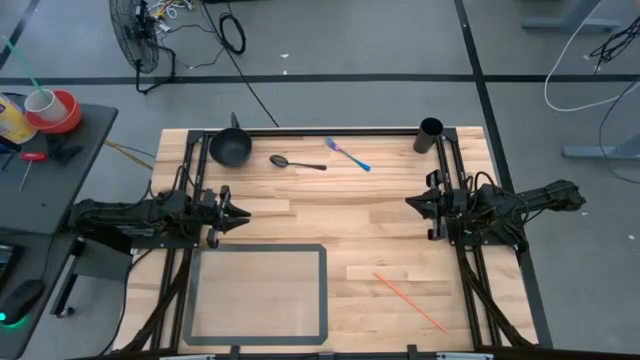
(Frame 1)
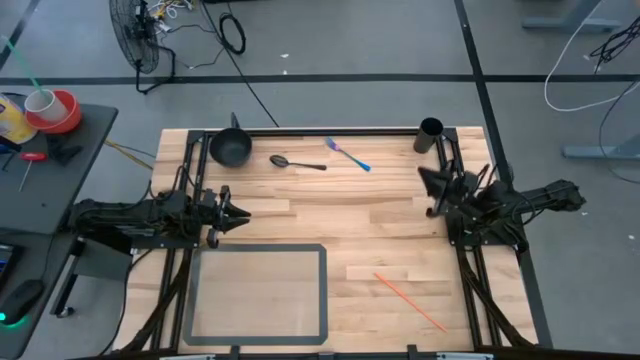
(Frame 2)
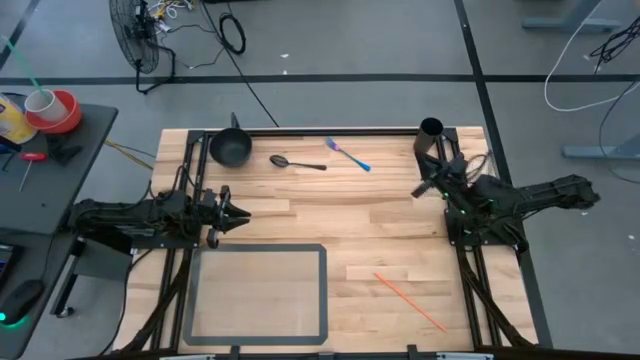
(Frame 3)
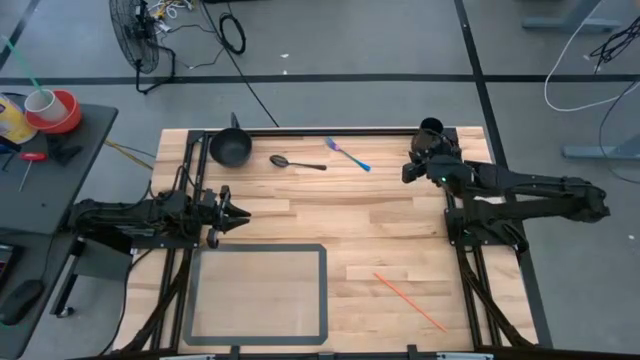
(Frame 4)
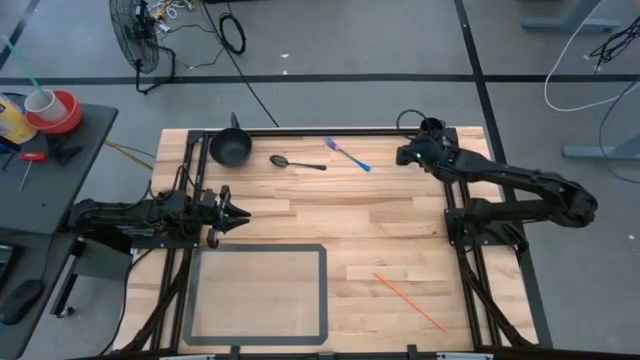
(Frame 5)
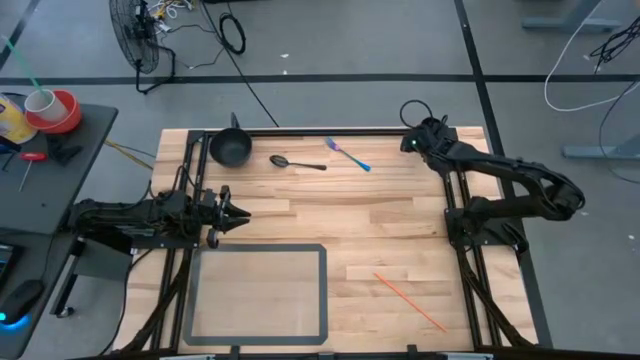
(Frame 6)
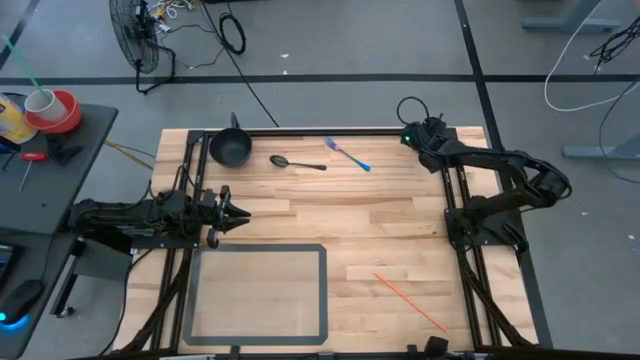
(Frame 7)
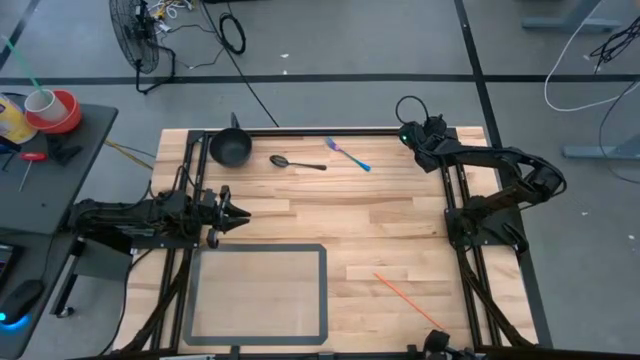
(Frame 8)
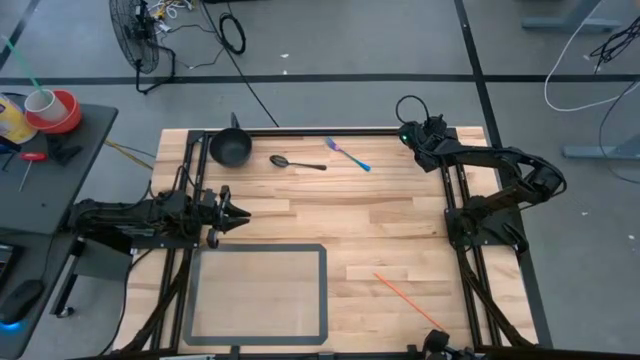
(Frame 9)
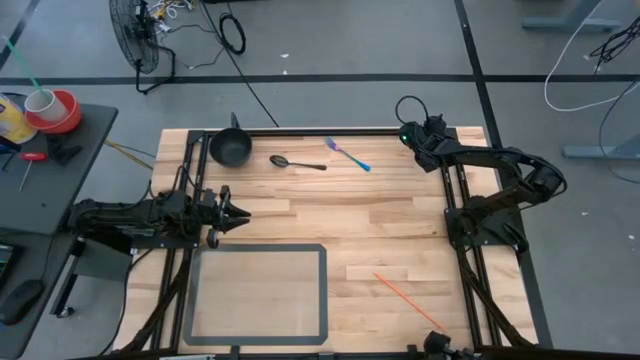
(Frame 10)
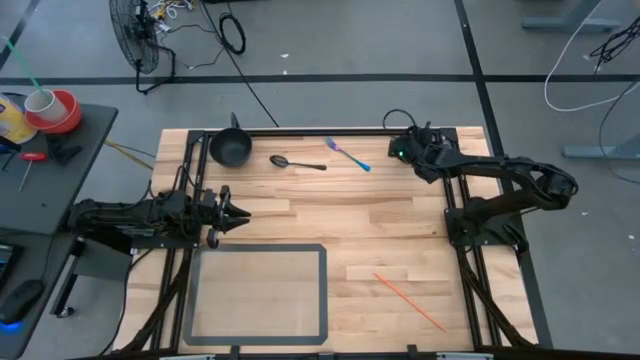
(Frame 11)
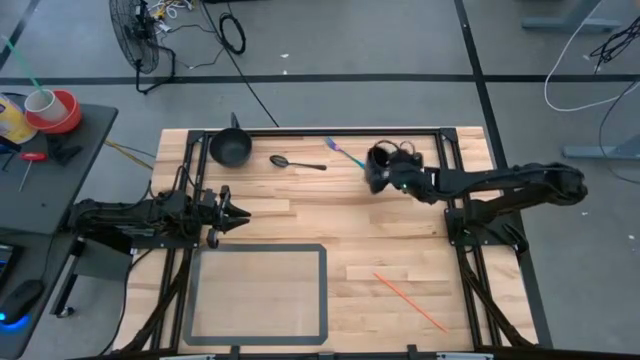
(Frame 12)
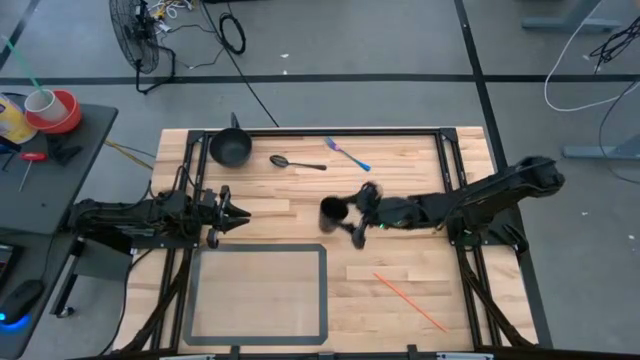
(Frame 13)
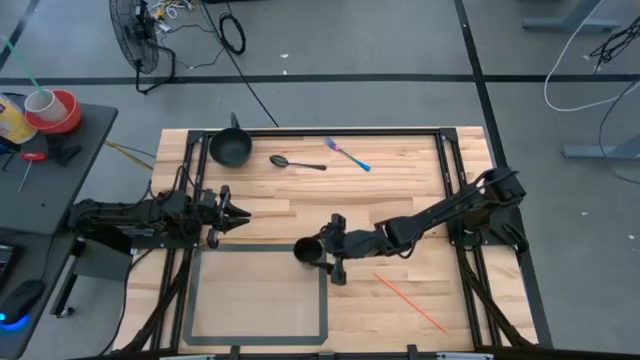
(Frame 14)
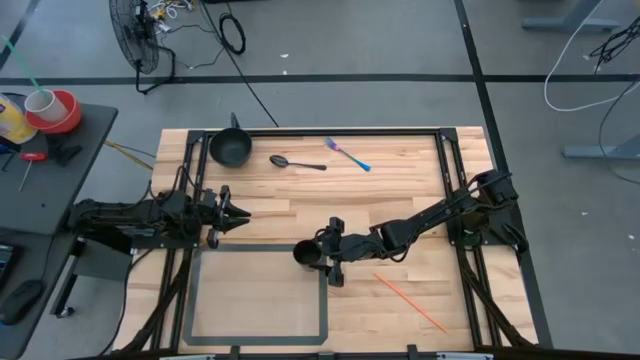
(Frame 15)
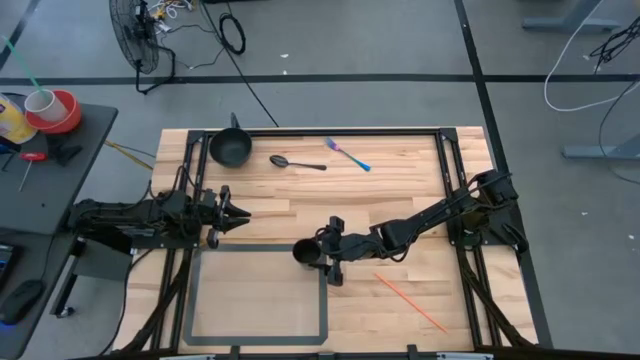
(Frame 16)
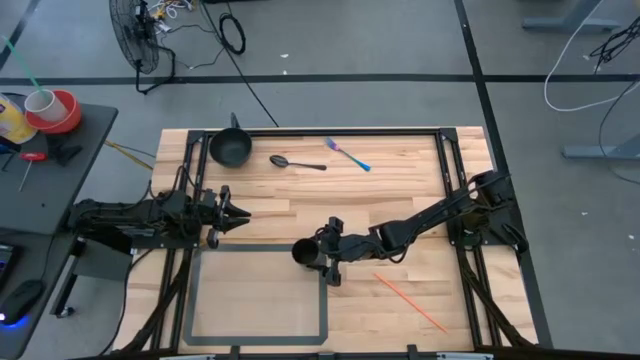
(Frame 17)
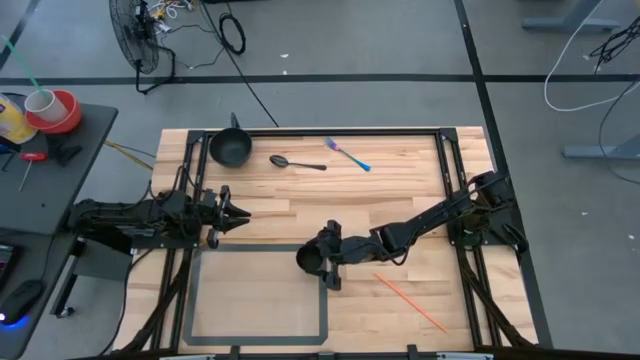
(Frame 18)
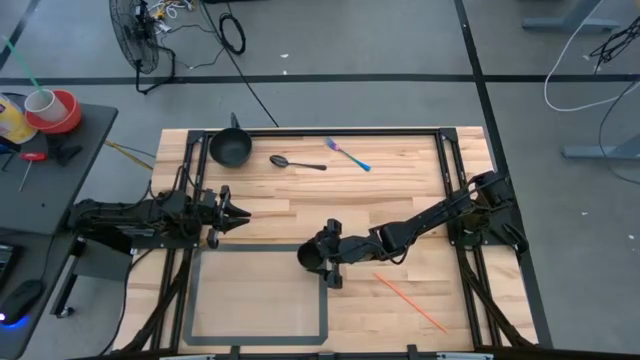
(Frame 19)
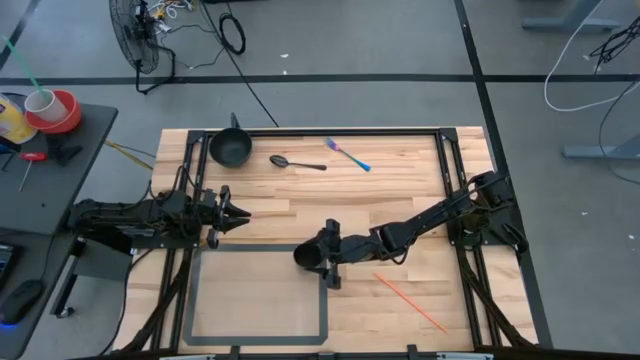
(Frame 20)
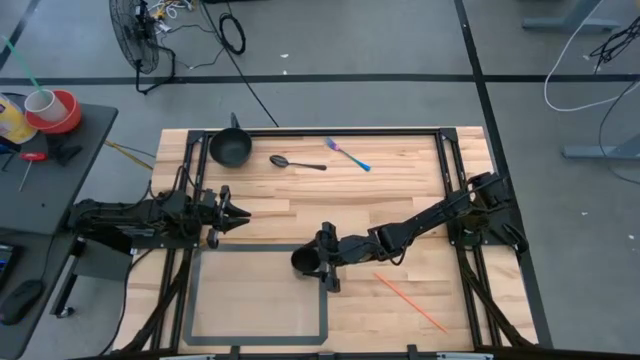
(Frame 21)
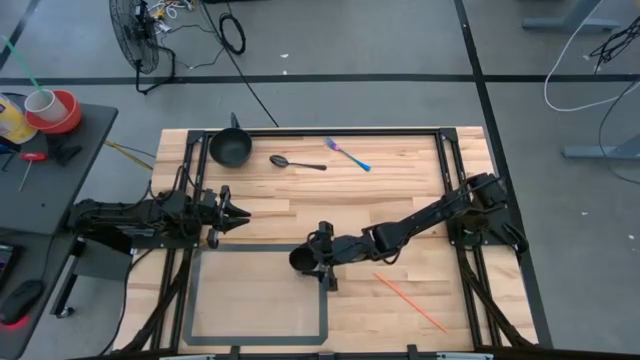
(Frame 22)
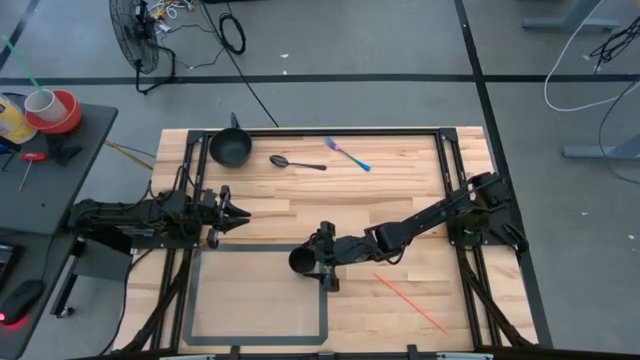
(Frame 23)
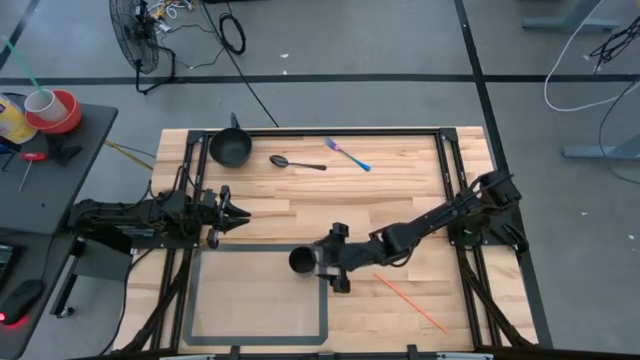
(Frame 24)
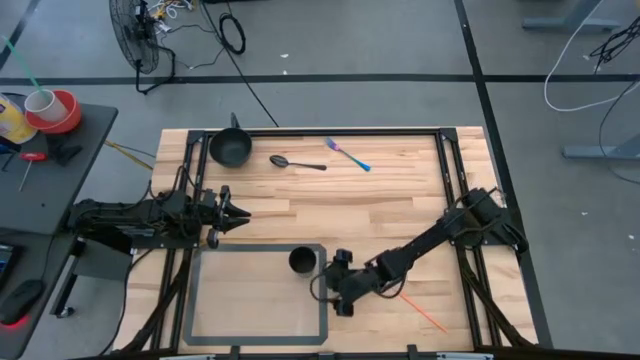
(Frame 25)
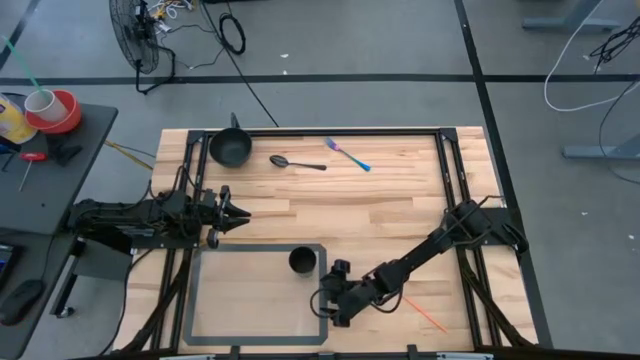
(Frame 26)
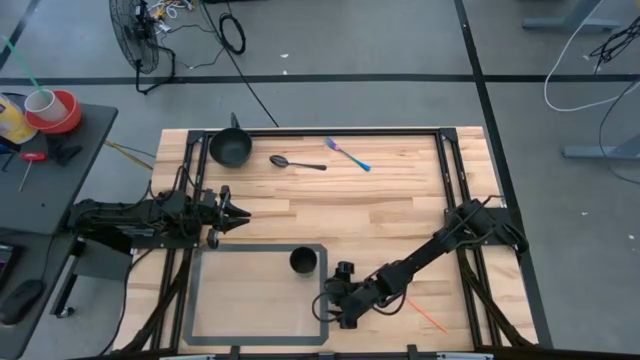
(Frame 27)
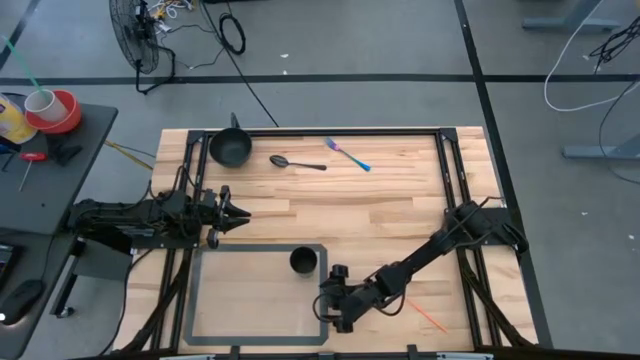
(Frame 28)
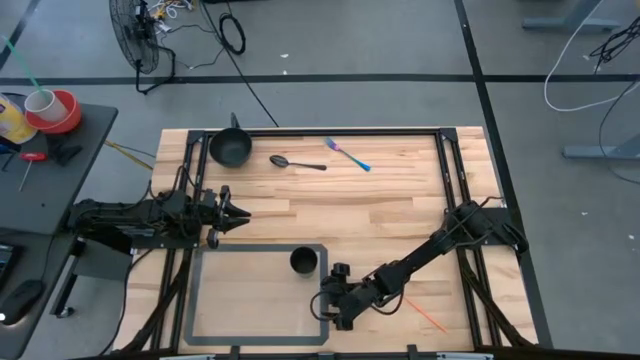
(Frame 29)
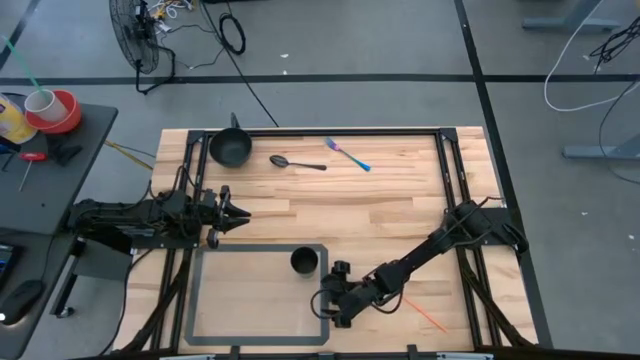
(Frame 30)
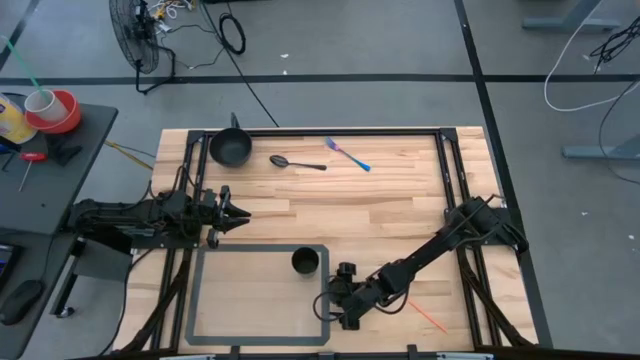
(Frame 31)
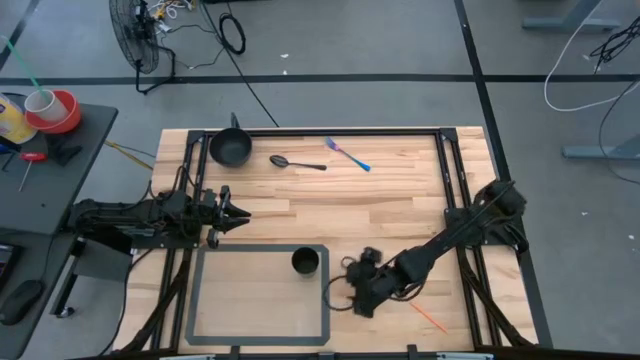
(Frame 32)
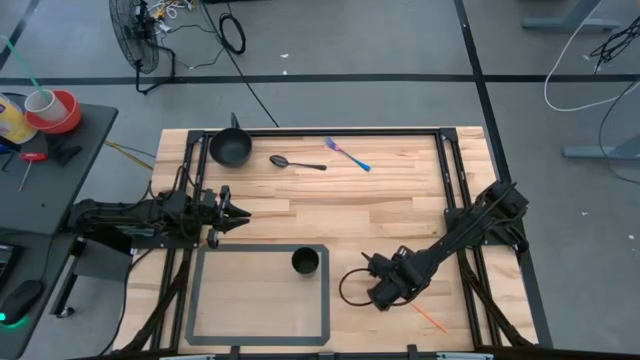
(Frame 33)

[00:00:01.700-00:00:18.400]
Task: Pick & Place Utensil
Put the black cup on the top right of the transparent mat

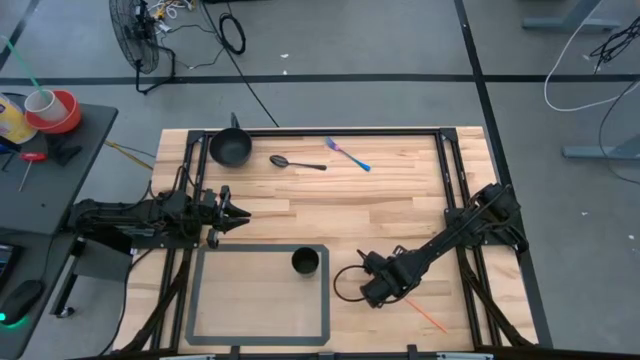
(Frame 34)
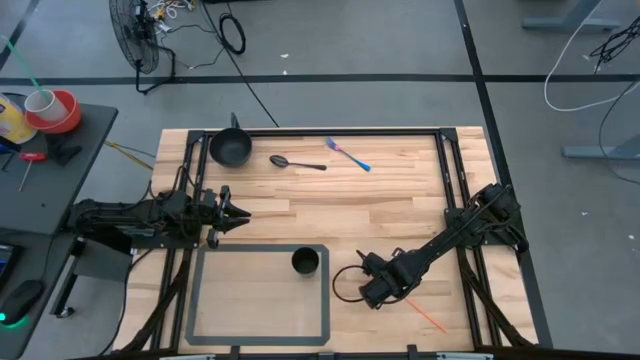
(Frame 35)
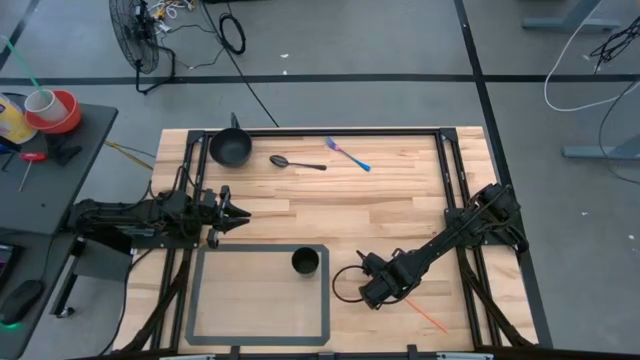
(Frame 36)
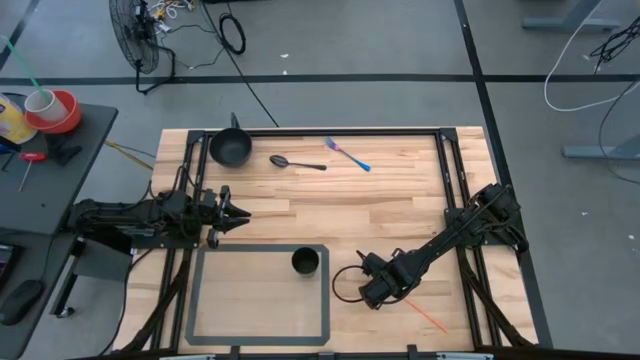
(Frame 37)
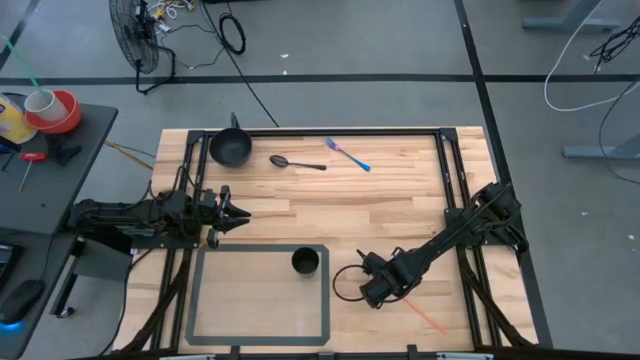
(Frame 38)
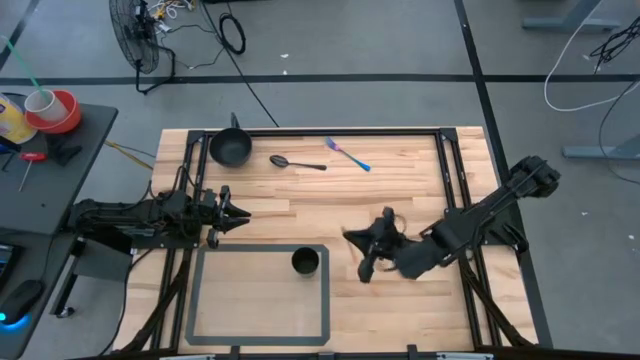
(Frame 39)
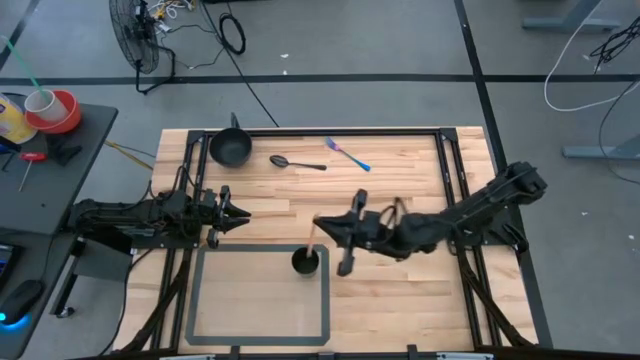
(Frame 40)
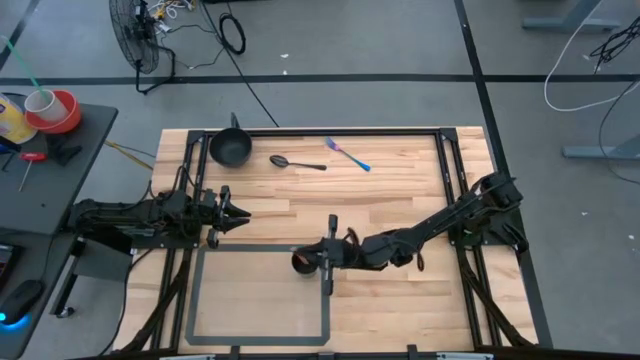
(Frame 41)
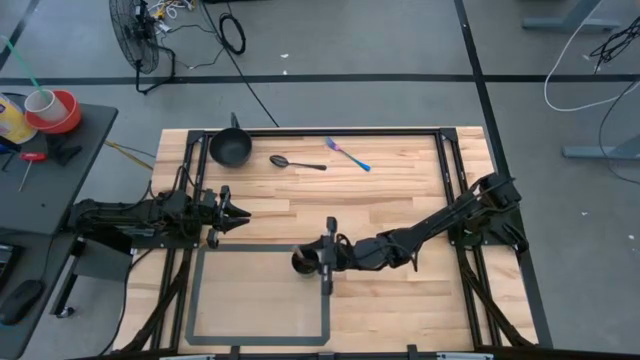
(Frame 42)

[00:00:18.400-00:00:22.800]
Put the orange straw into the black cup
